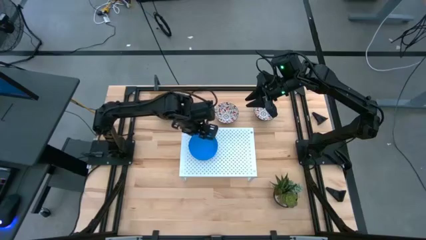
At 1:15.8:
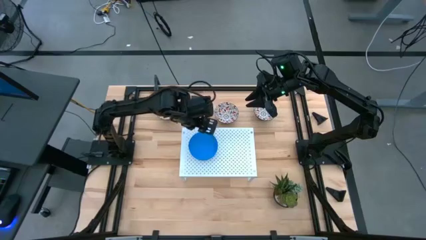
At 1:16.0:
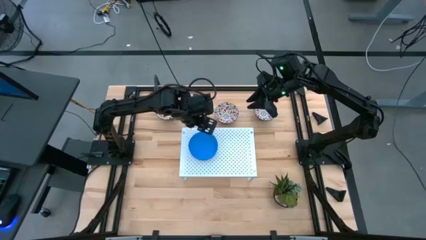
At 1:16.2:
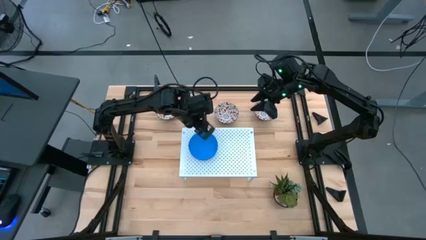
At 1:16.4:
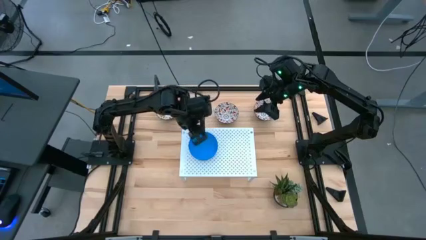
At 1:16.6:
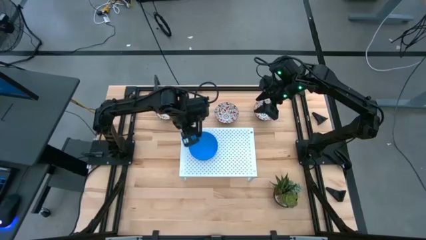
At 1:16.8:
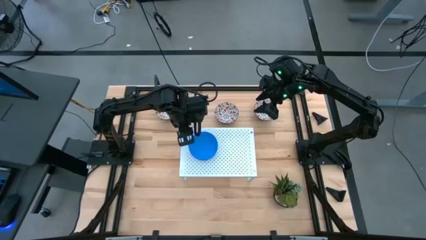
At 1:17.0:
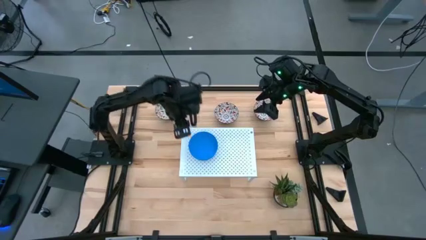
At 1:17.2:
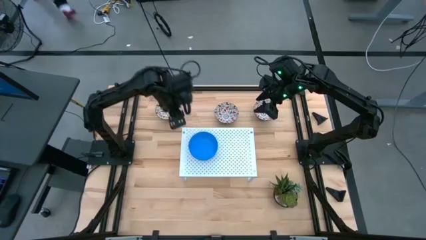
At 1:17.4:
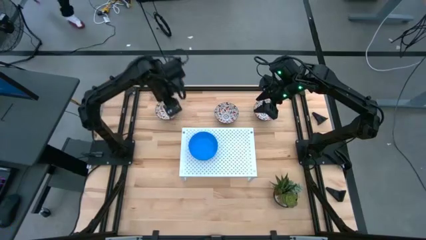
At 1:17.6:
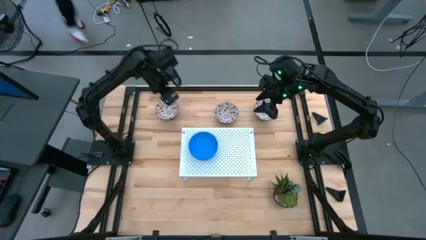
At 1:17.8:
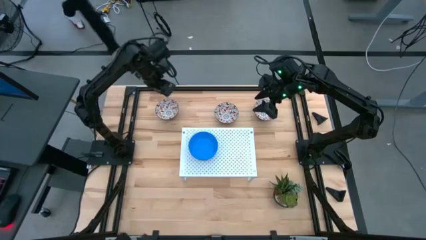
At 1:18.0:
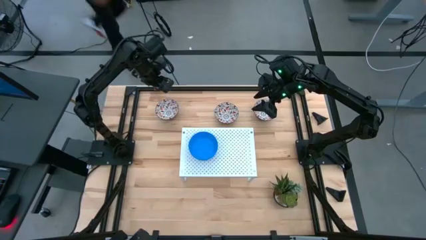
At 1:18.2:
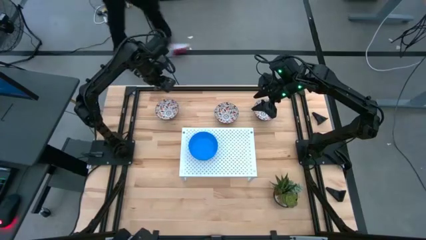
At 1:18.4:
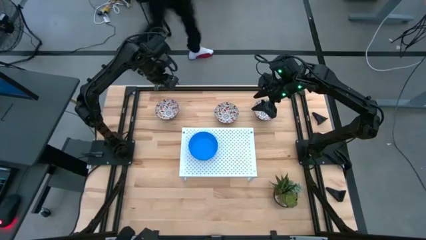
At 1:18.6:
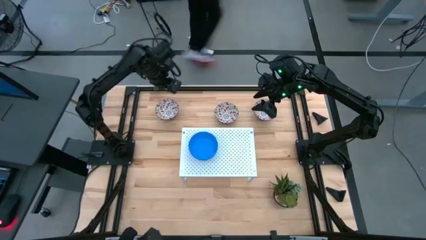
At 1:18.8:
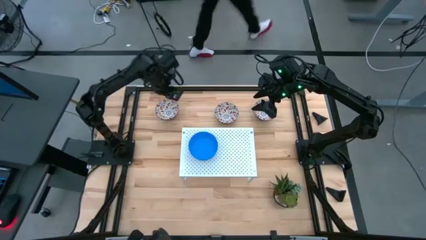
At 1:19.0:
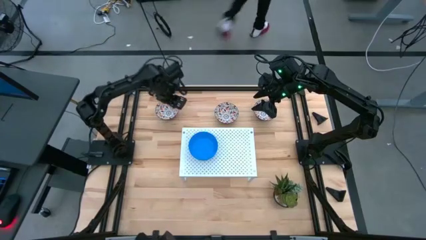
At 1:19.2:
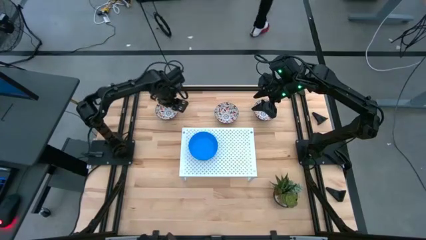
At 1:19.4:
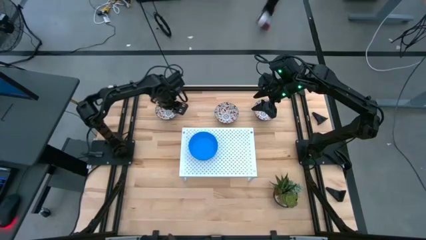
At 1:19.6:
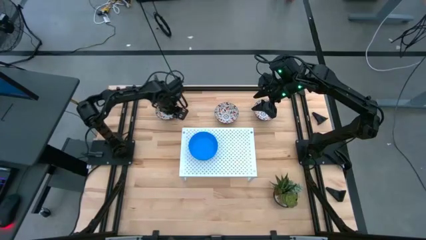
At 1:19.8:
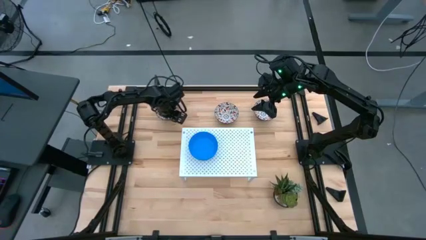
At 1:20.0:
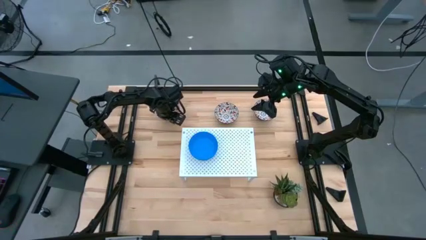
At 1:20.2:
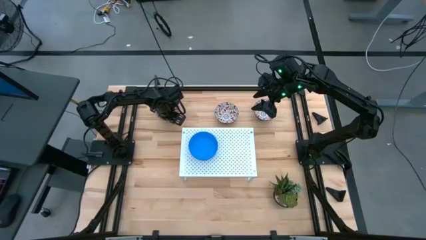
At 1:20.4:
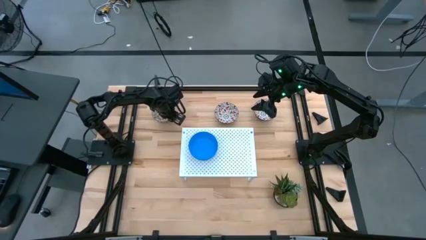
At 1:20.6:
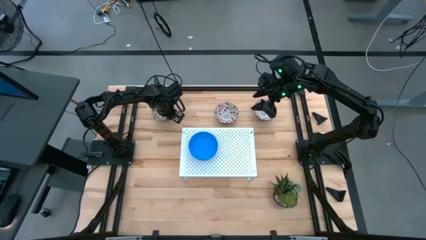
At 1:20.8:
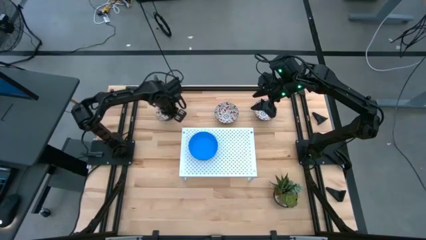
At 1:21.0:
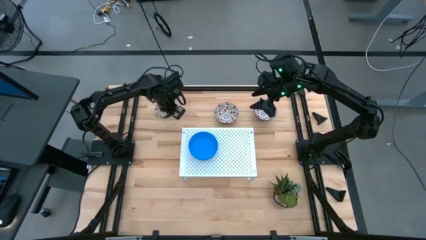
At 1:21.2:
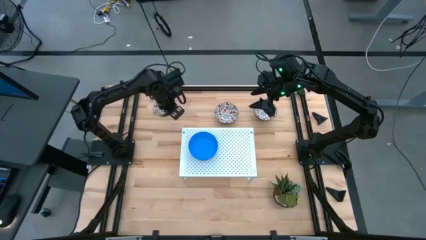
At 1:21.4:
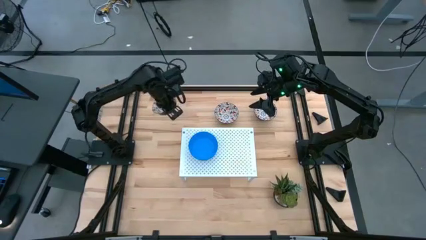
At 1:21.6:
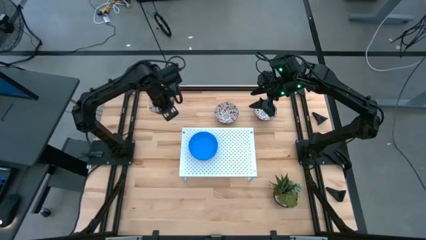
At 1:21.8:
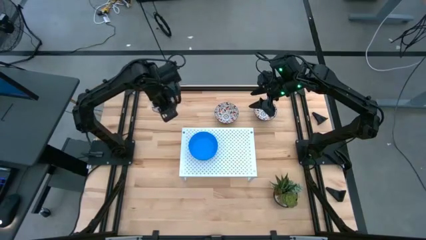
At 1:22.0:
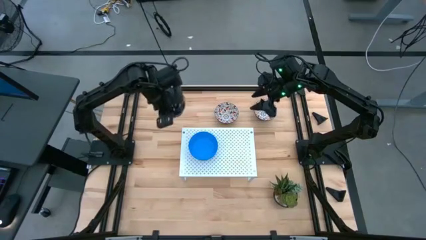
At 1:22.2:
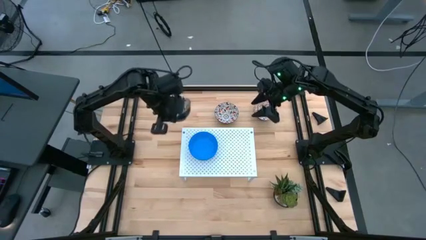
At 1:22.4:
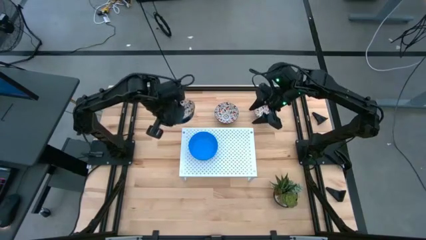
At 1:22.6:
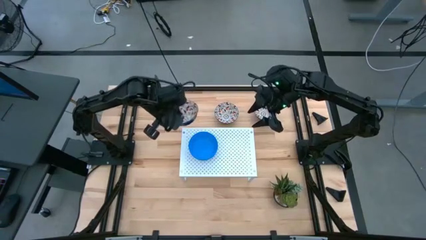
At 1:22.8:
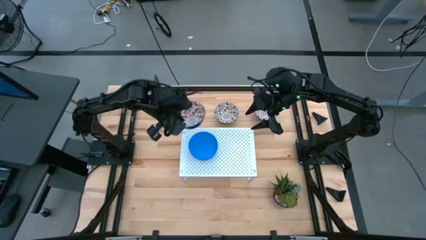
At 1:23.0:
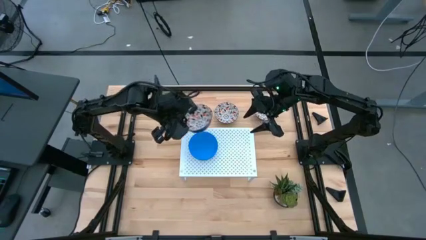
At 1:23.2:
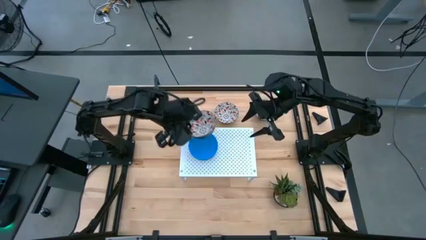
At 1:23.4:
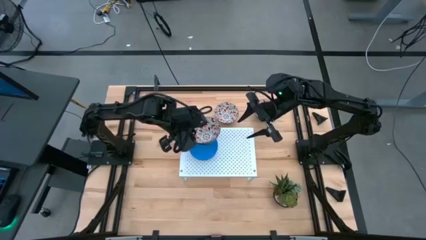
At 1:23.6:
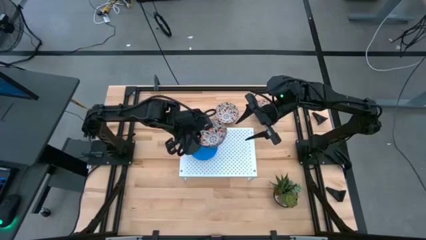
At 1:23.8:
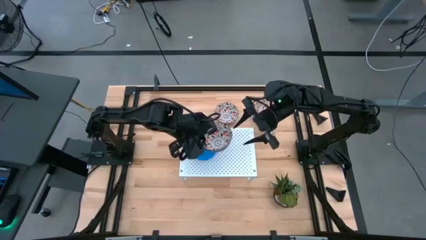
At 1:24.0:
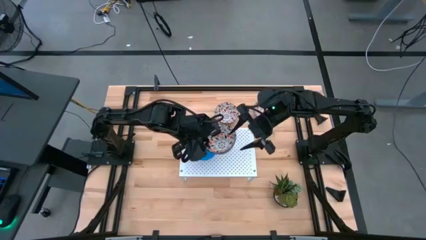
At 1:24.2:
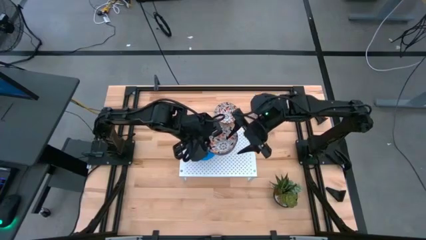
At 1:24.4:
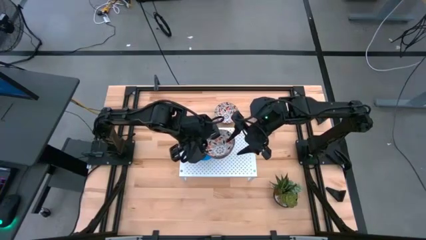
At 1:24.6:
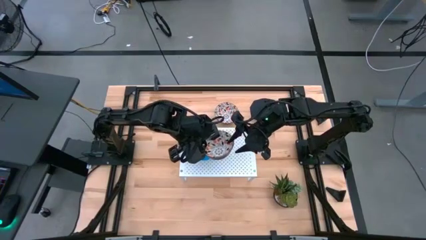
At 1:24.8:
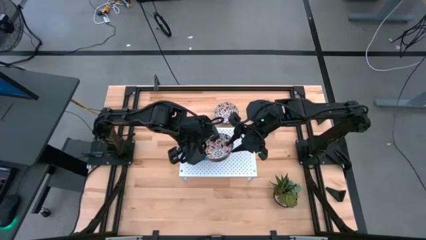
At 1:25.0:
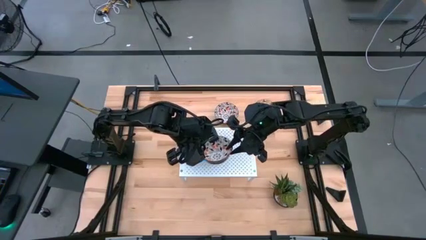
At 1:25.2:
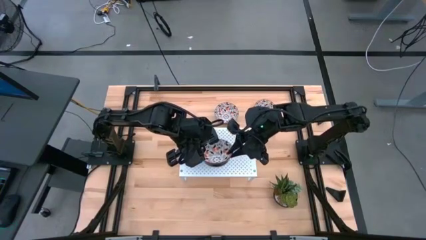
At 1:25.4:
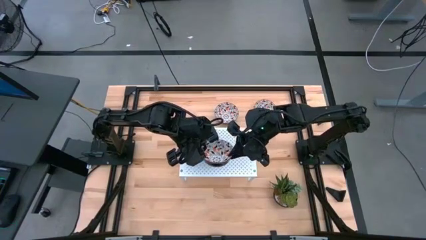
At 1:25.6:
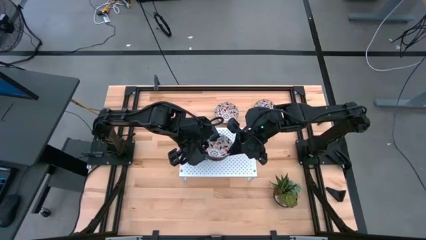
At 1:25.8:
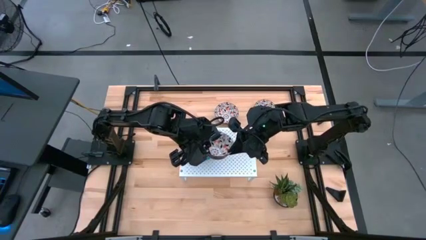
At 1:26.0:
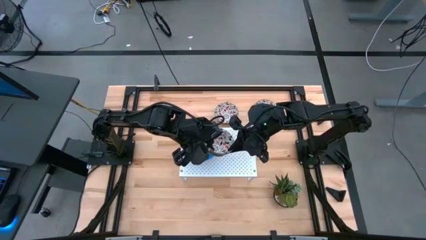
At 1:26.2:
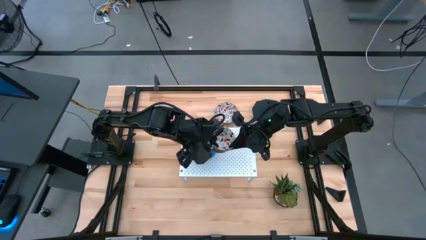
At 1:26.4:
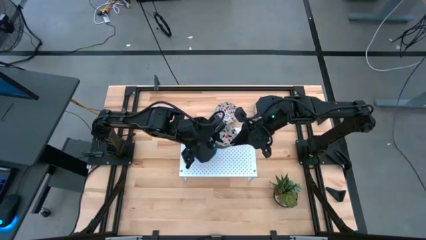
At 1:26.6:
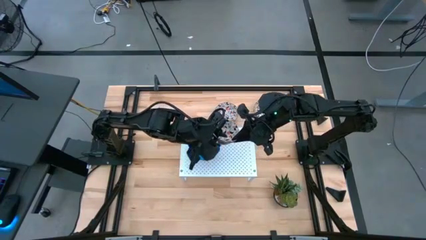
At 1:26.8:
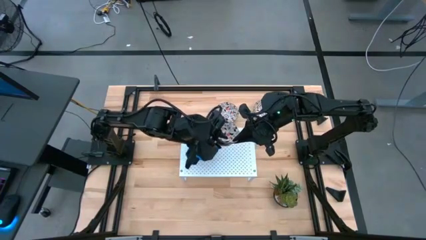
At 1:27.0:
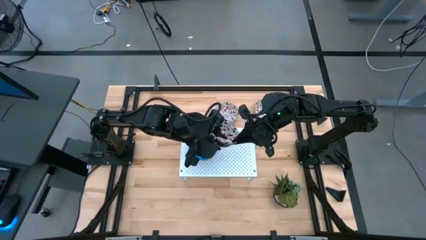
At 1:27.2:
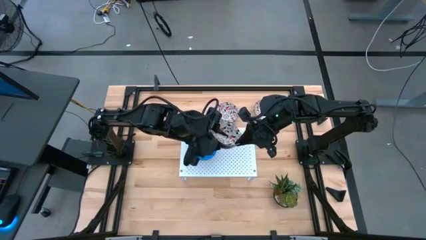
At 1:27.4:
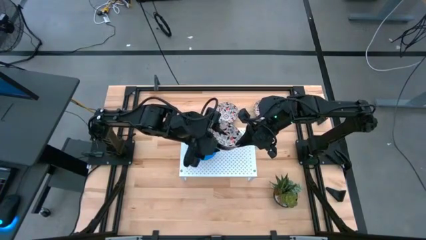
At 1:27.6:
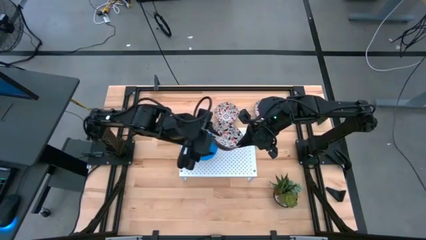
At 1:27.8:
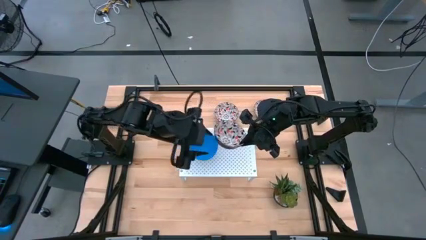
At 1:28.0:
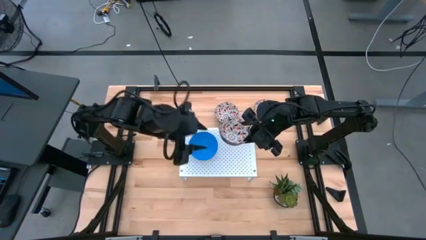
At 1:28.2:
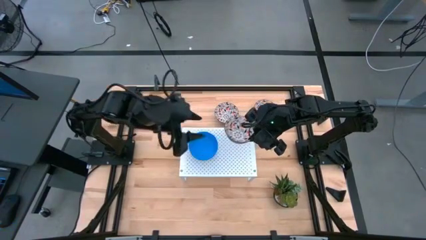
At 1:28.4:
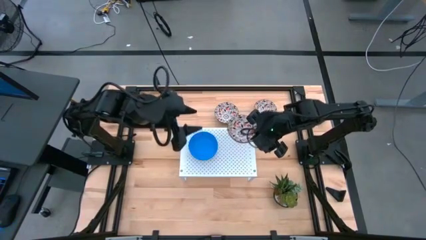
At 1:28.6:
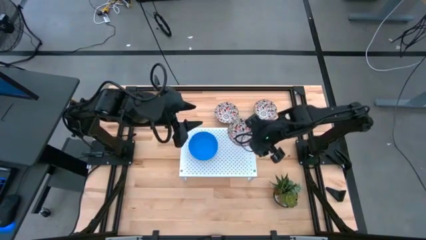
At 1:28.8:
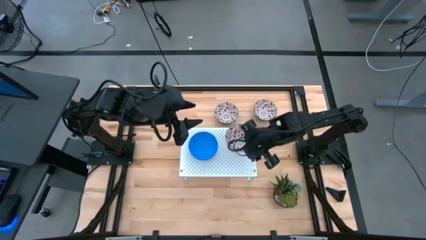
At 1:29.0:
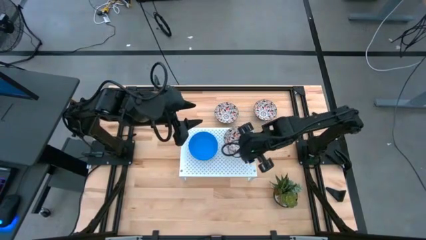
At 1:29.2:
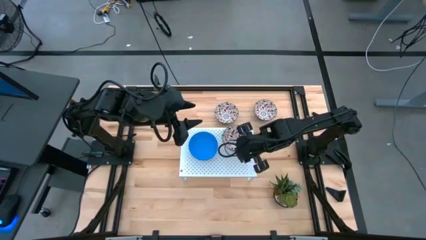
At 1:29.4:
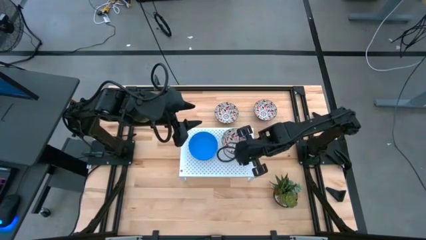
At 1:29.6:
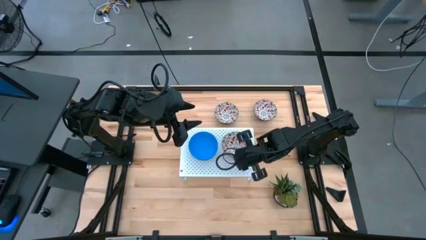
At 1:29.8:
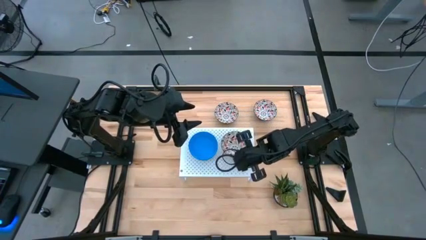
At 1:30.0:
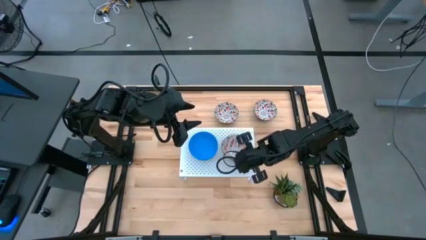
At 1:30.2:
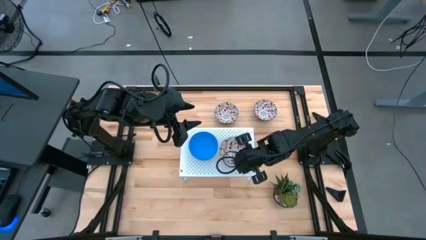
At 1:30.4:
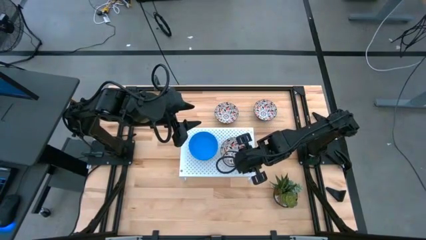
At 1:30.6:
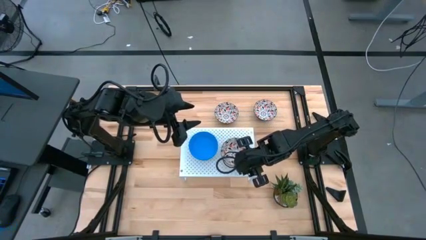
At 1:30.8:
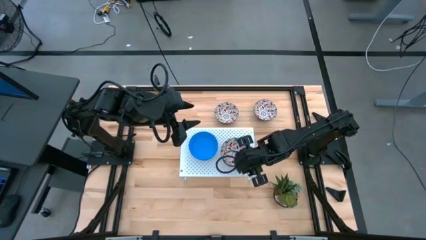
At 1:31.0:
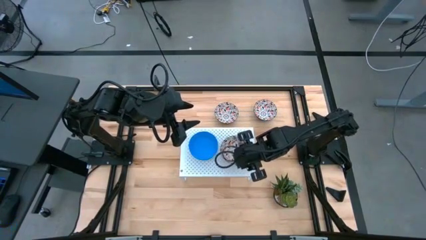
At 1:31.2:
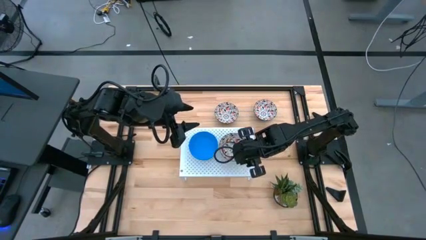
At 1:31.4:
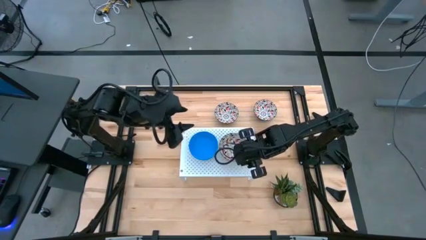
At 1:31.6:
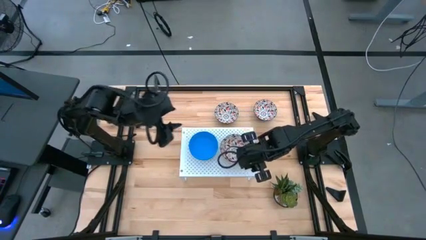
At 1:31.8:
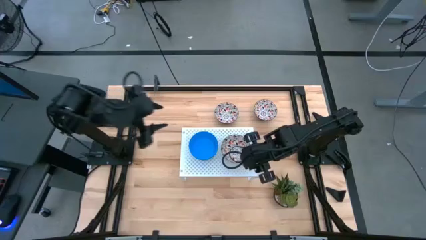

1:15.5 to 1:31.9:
Task: Pick & Place Mini bowls
Put the left orange patterned bowl on the shelf
